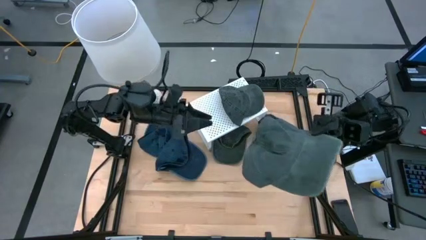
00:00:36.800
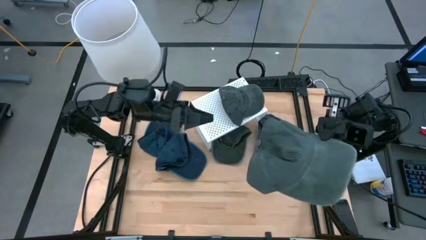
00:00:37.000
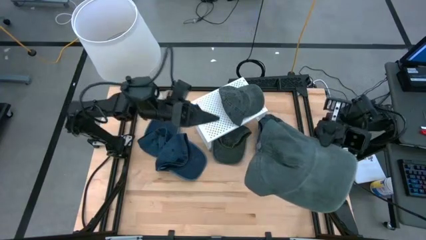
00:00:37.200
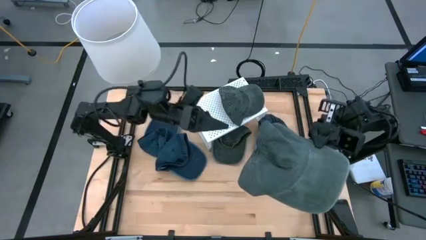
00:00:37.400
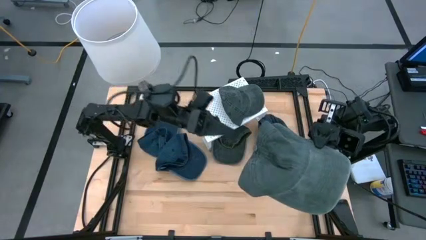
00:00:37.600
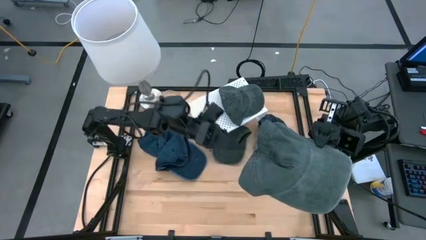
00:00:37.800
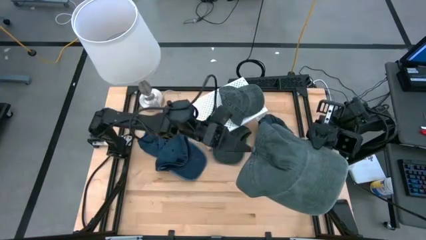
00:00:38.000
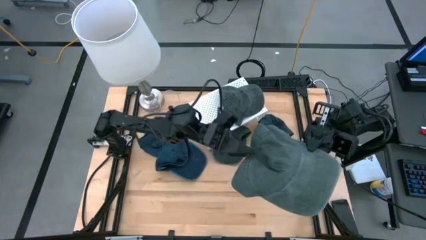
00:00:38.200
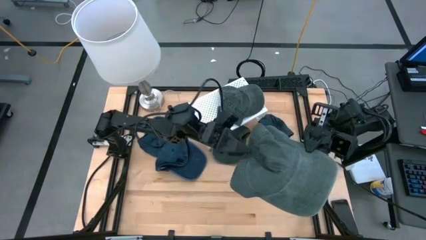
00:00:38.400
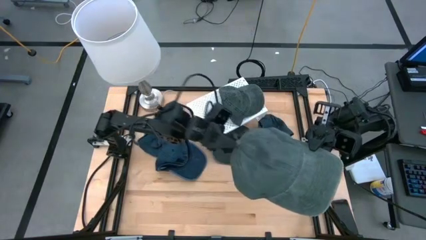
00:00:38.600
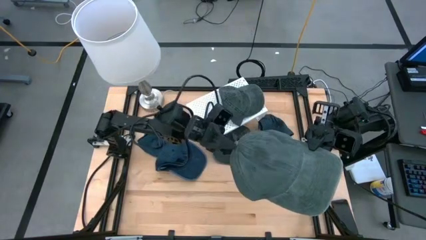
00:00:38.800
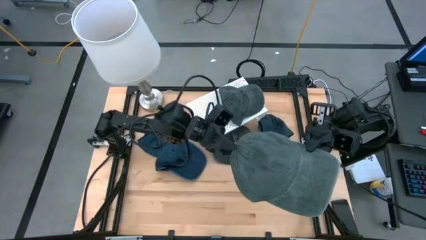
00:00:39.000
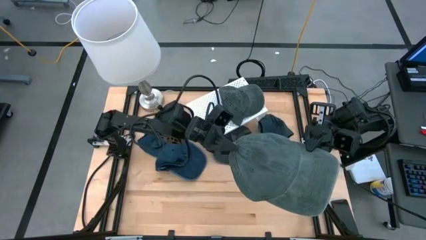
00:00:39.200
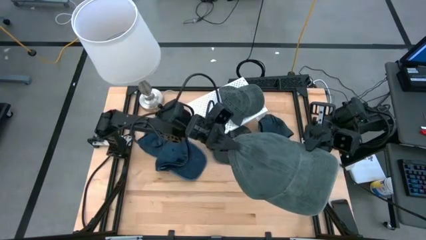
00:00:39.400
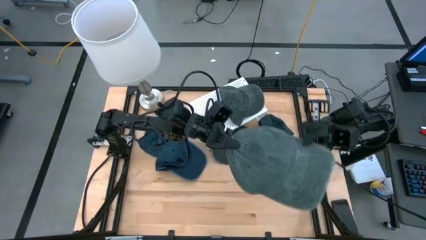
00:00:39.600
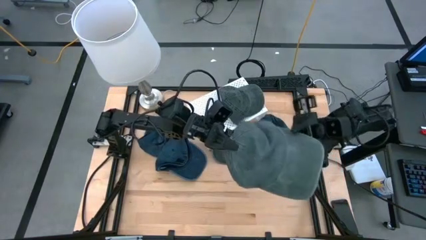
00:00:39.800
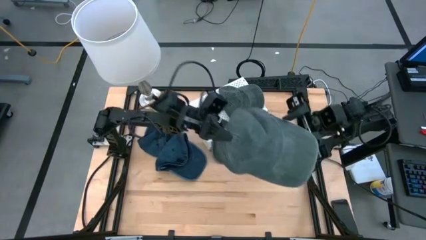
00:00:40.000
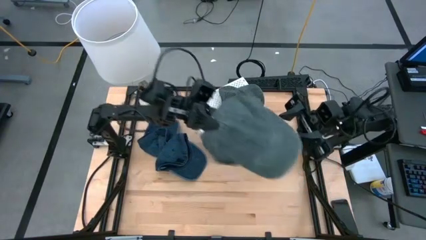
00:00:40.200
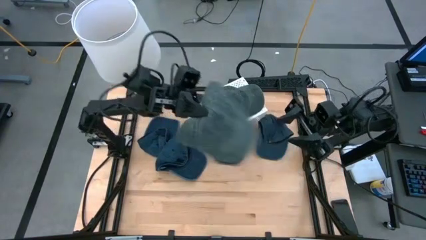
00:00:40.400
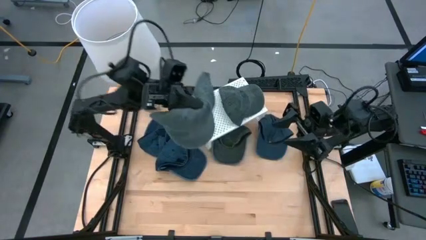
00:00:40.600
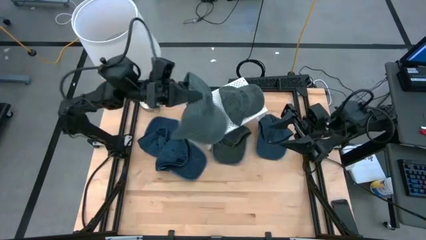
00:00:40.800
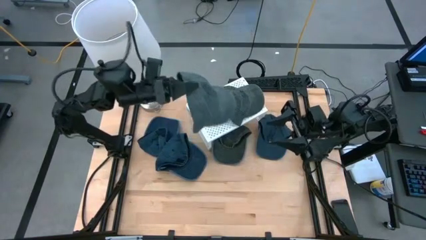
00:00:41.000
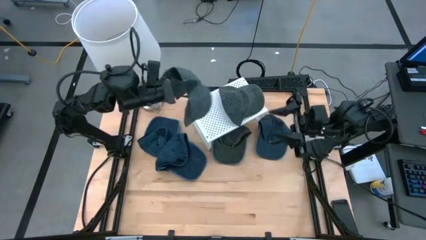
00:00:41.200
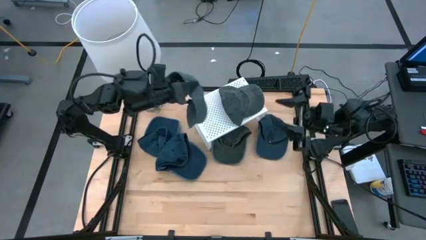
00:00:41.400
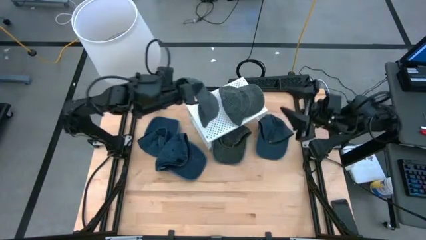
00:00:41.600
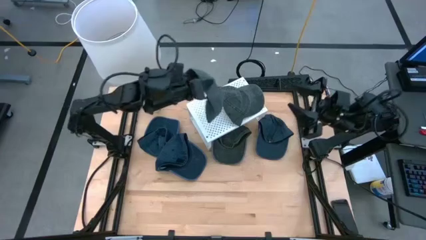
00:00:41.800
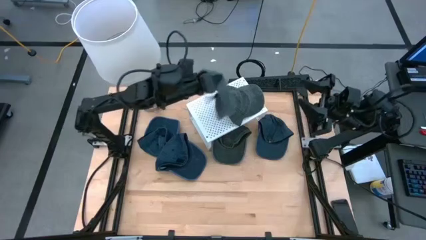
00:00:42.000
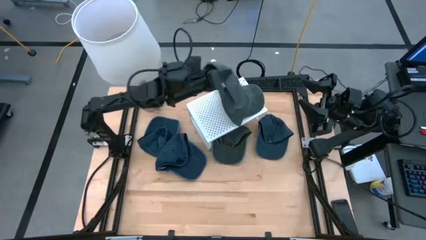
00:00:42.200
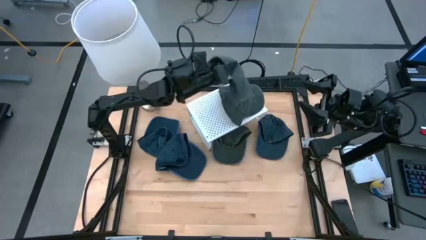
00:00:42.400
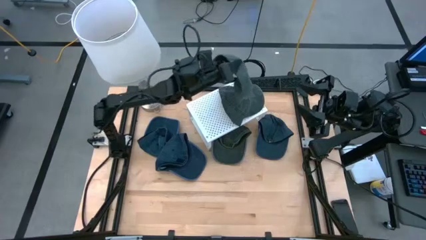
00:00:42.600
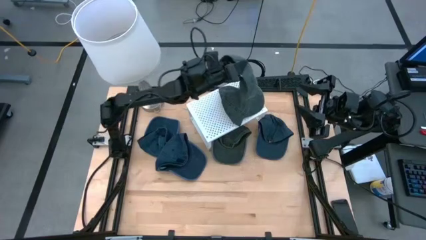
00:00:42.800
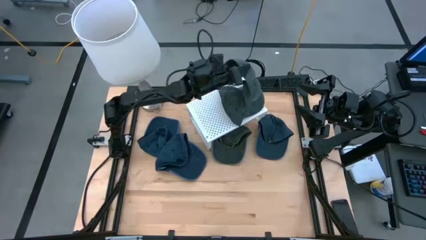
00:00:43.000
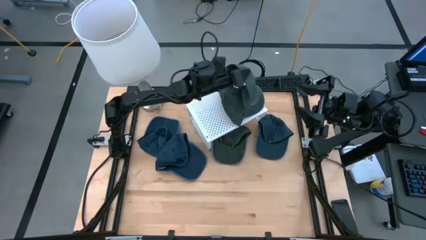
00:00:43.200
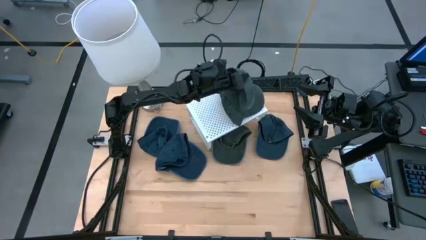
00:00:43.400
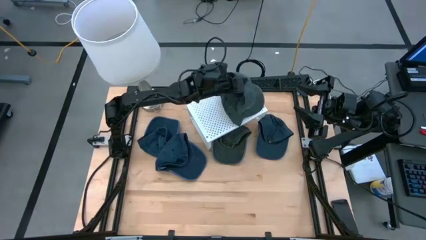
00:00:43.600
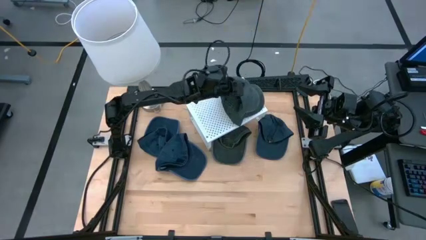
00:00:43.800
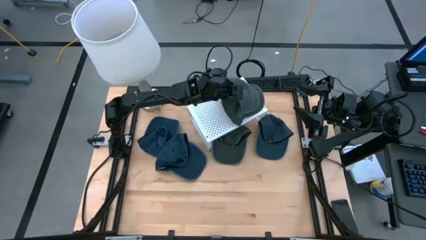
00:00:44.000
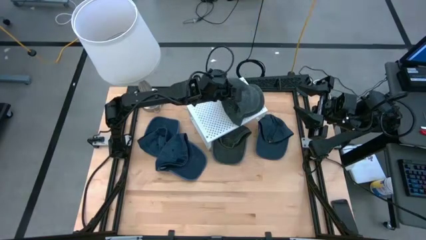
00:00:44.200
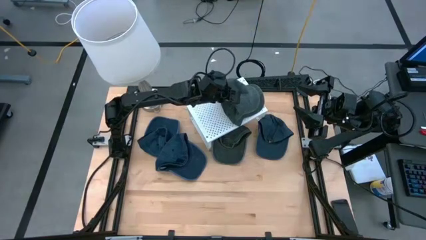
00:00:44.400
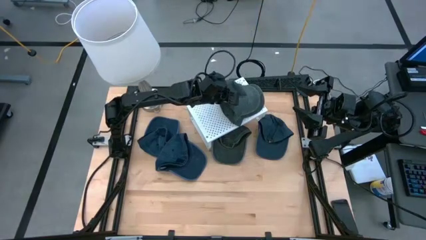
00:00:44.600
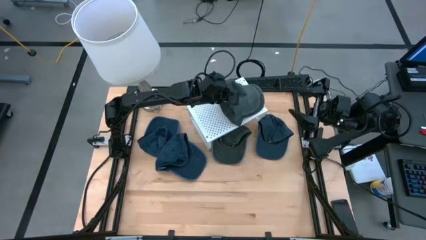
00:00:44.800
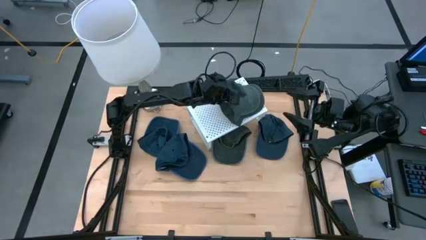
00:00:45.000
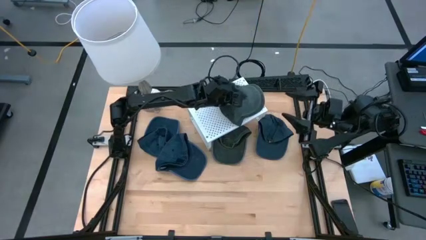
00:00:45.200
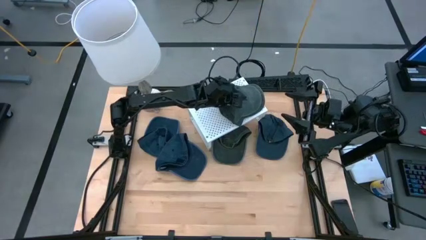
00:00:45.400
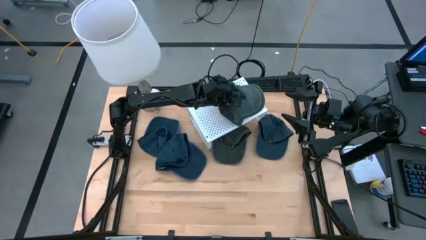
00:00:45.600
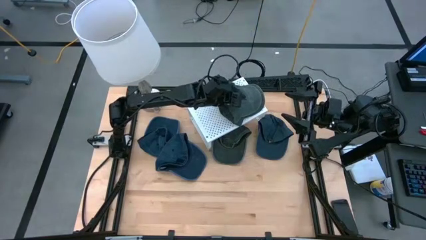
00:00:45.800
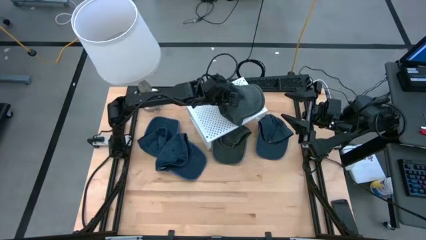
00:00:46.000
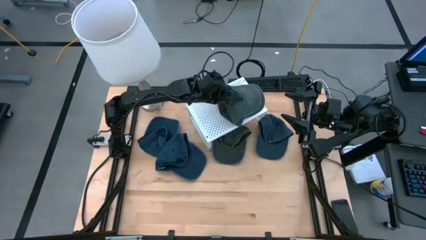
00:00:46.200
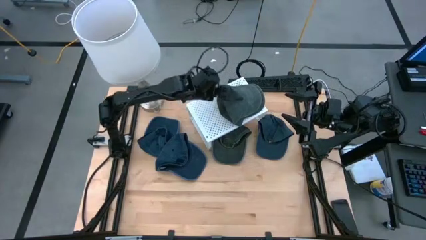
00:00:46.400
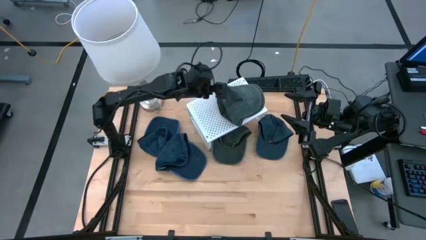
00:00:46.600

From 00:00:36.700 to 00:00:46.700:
Task: Pick & Place hat
Stack the green cap on top of the other green cap on the shelf
